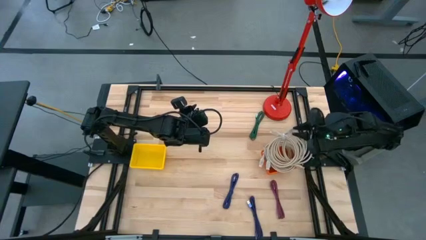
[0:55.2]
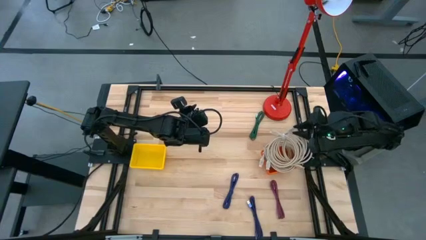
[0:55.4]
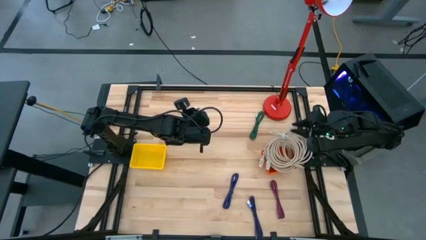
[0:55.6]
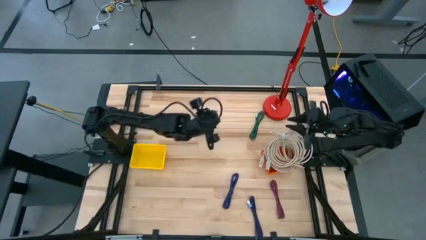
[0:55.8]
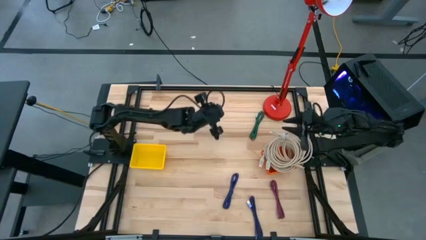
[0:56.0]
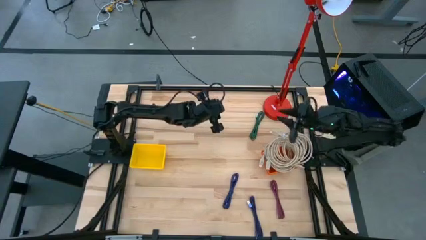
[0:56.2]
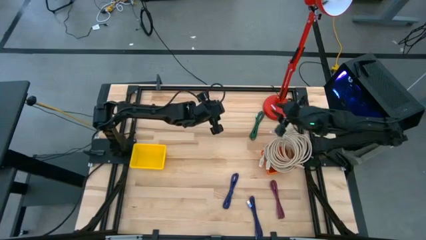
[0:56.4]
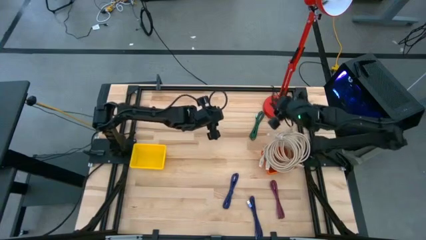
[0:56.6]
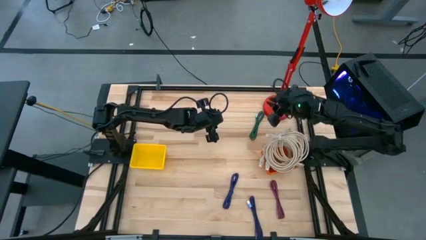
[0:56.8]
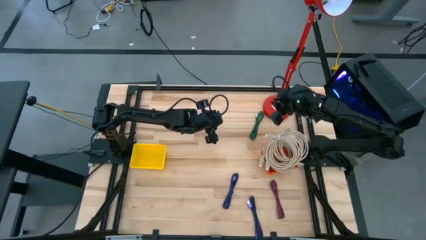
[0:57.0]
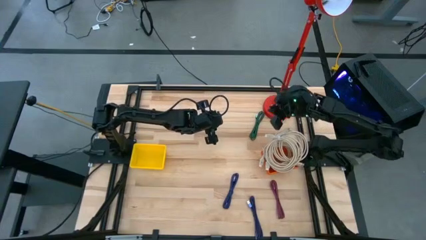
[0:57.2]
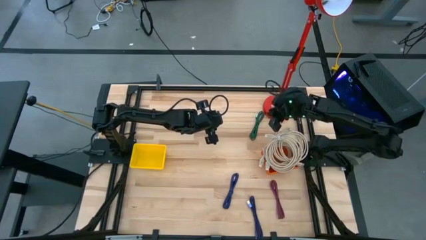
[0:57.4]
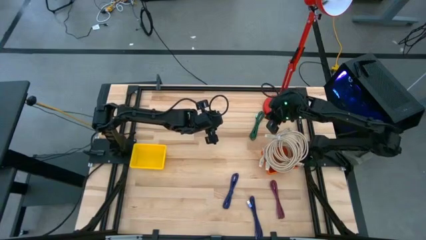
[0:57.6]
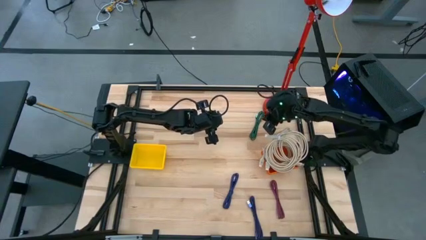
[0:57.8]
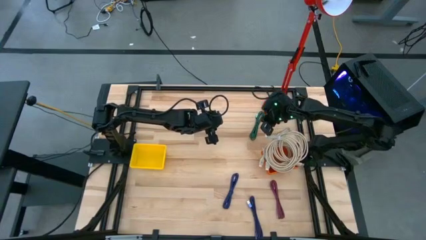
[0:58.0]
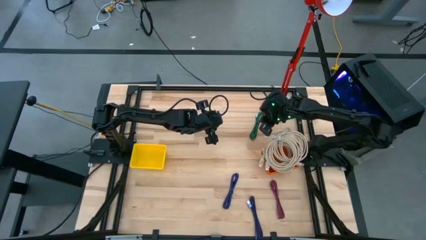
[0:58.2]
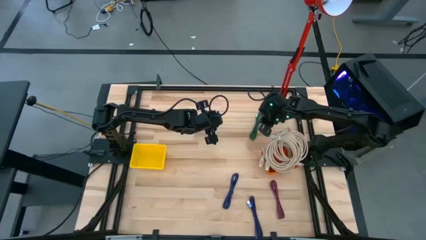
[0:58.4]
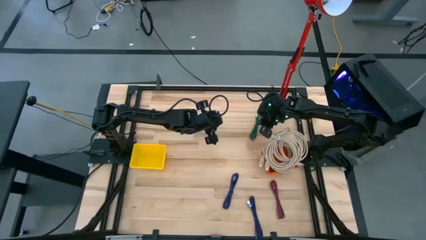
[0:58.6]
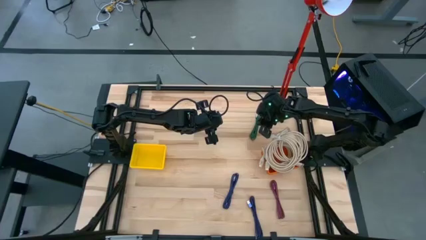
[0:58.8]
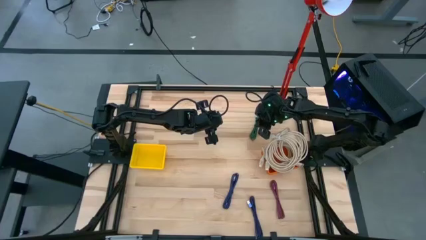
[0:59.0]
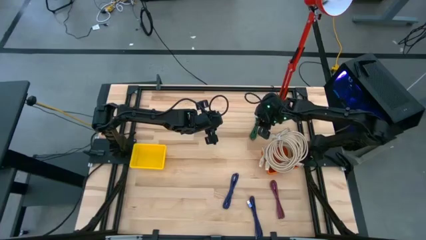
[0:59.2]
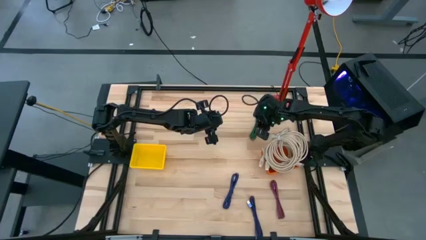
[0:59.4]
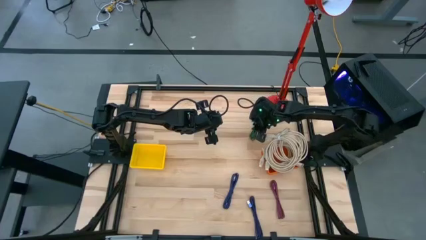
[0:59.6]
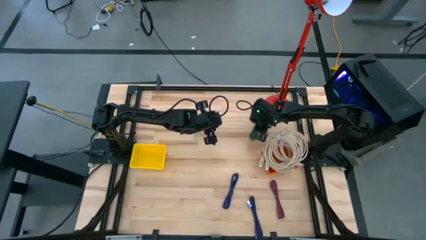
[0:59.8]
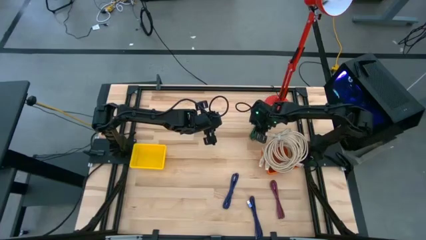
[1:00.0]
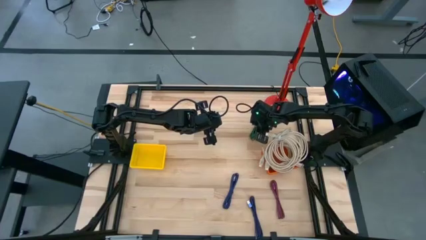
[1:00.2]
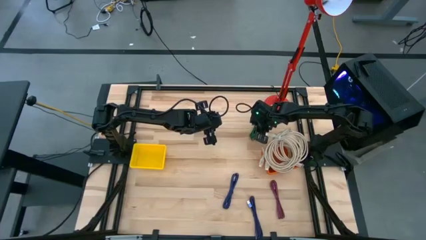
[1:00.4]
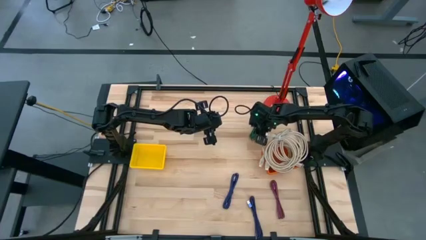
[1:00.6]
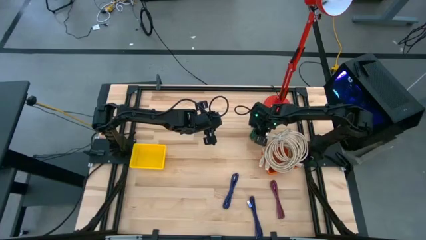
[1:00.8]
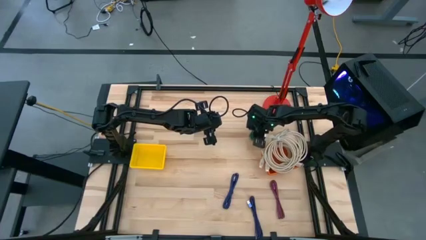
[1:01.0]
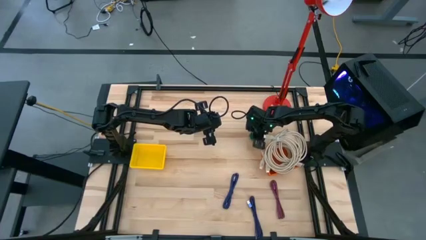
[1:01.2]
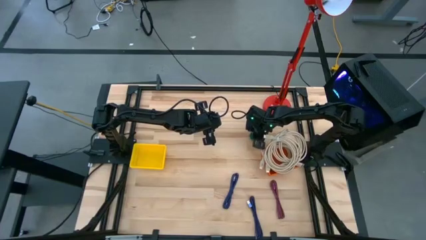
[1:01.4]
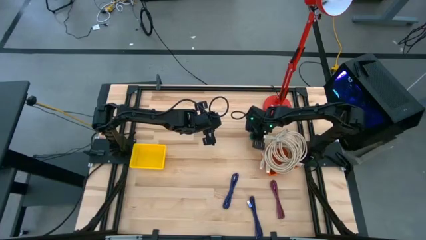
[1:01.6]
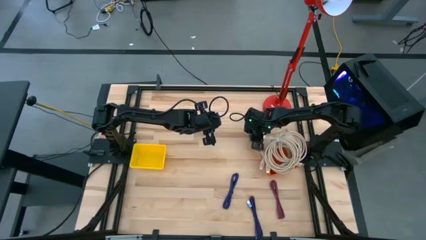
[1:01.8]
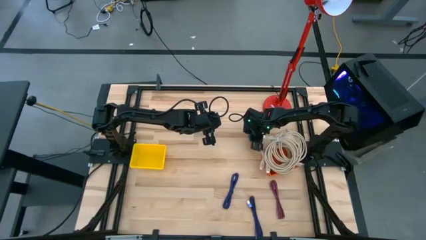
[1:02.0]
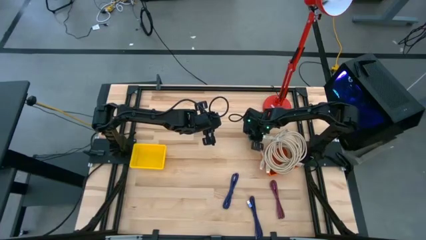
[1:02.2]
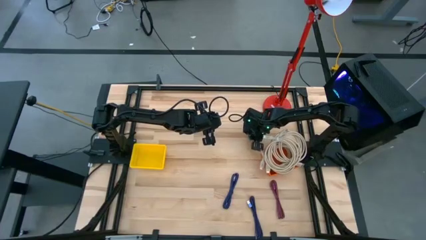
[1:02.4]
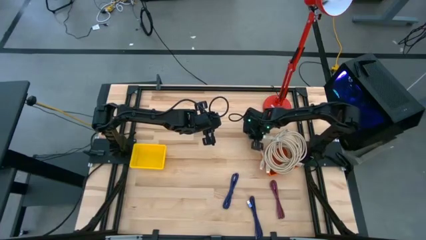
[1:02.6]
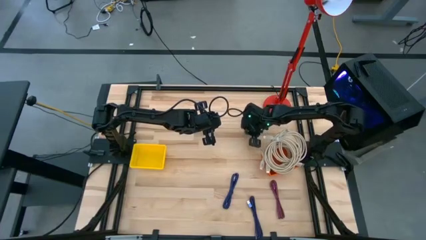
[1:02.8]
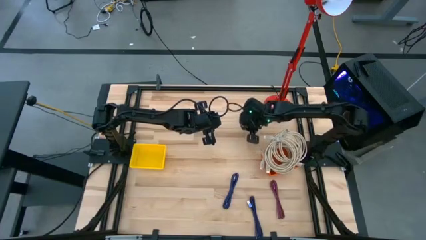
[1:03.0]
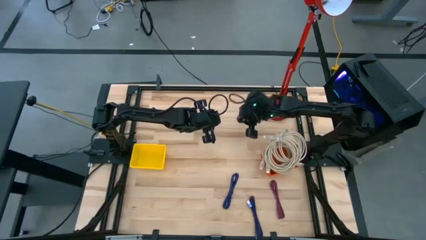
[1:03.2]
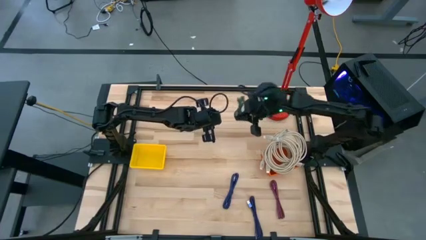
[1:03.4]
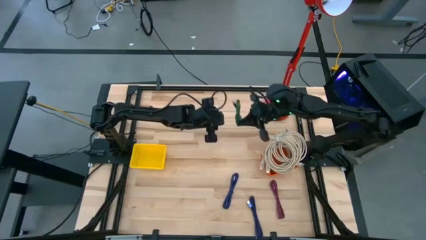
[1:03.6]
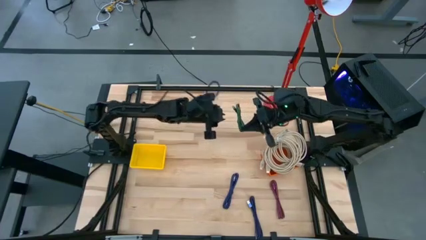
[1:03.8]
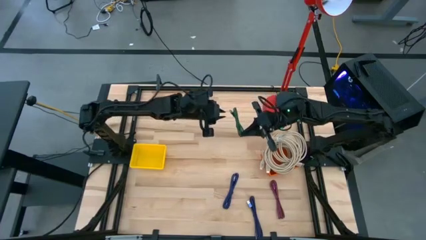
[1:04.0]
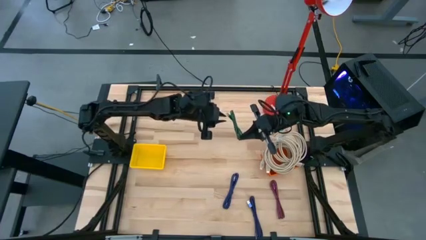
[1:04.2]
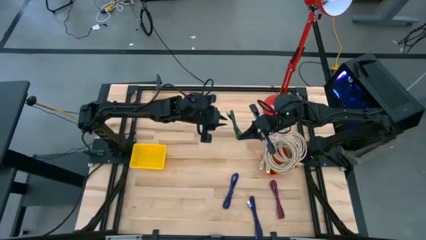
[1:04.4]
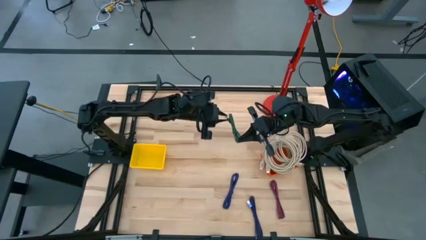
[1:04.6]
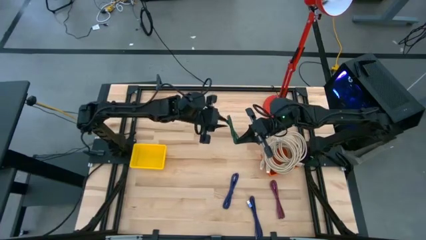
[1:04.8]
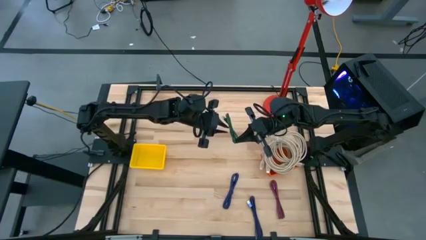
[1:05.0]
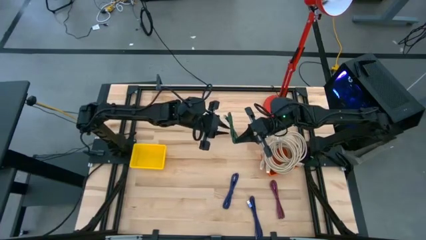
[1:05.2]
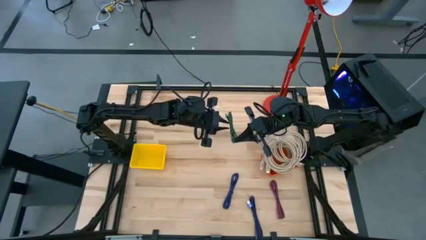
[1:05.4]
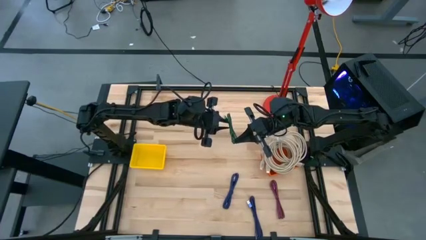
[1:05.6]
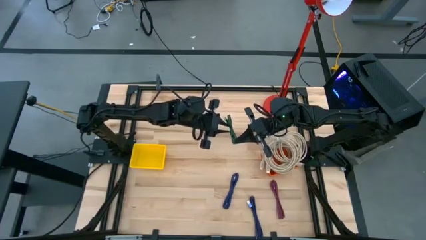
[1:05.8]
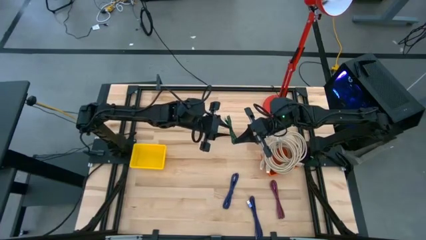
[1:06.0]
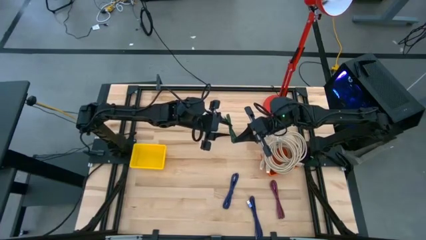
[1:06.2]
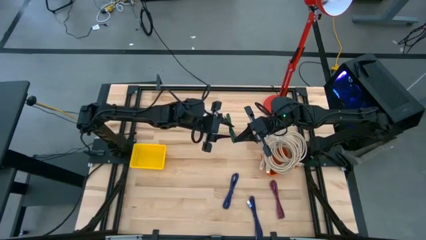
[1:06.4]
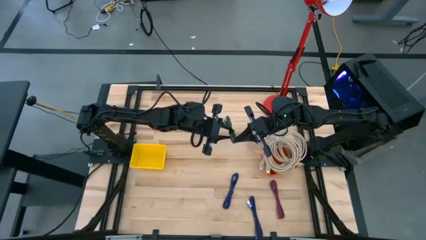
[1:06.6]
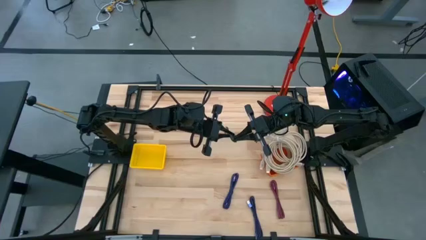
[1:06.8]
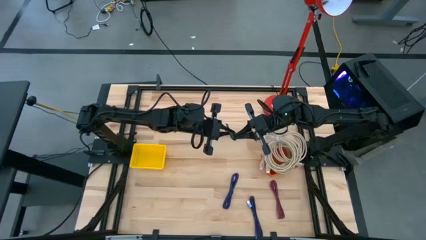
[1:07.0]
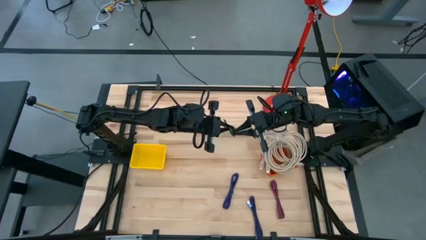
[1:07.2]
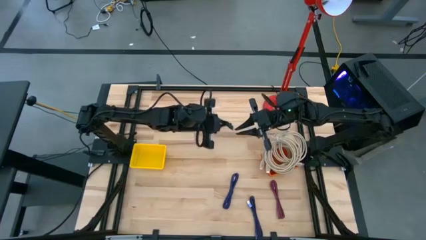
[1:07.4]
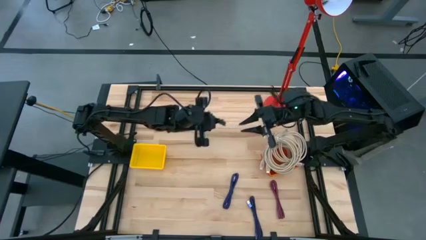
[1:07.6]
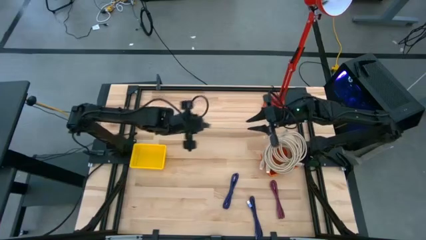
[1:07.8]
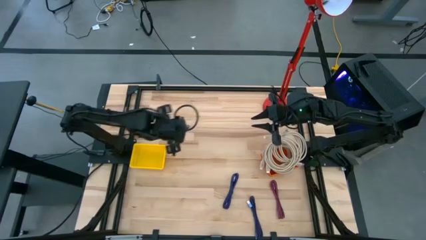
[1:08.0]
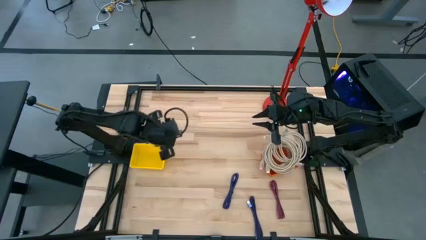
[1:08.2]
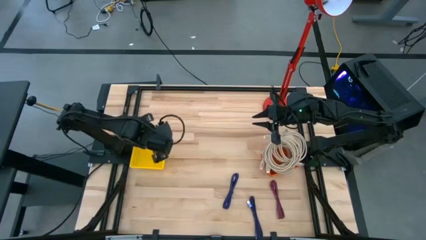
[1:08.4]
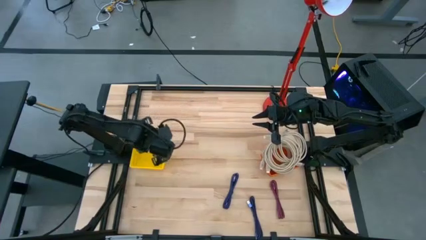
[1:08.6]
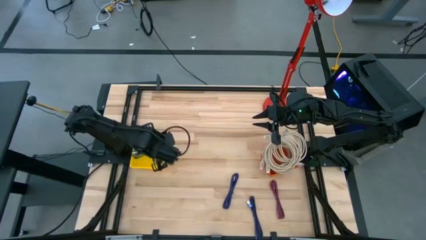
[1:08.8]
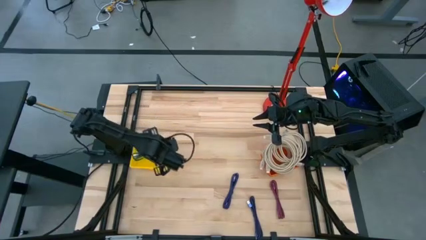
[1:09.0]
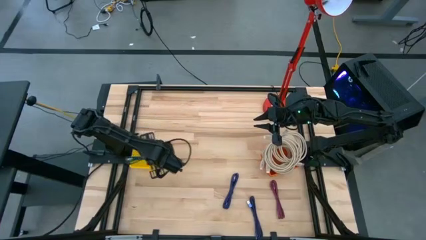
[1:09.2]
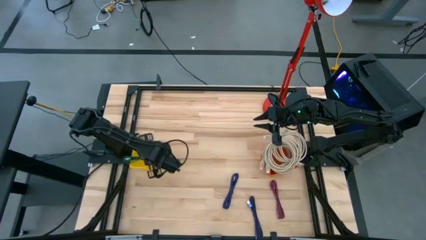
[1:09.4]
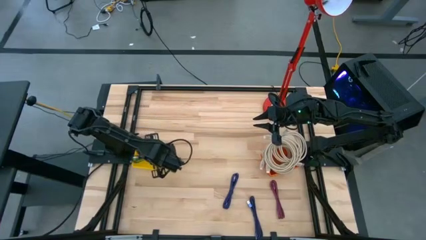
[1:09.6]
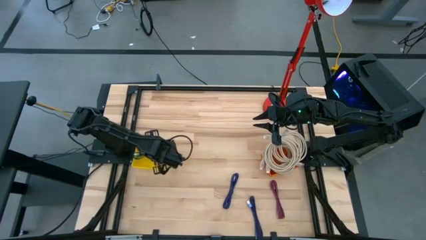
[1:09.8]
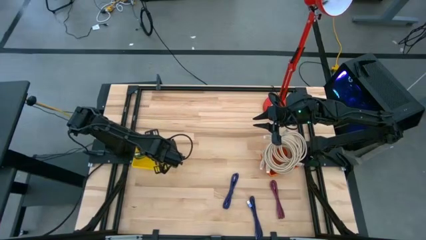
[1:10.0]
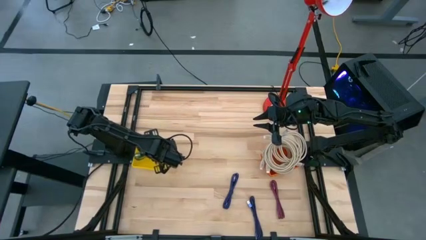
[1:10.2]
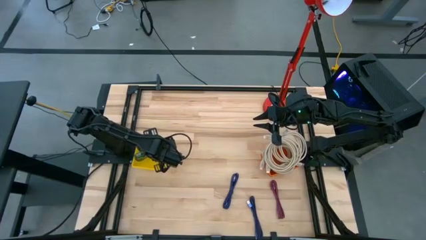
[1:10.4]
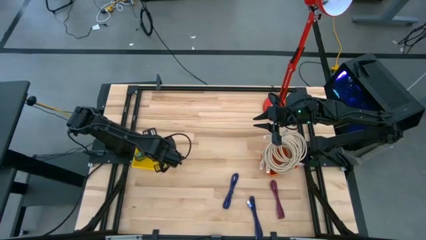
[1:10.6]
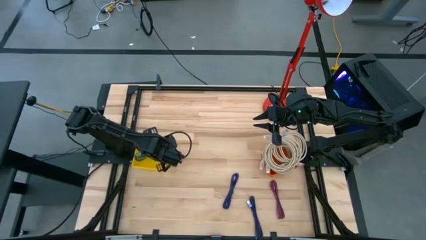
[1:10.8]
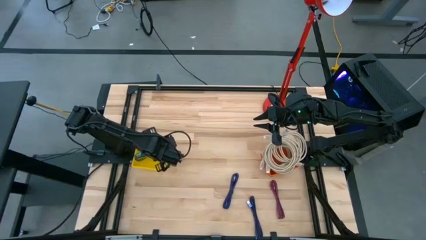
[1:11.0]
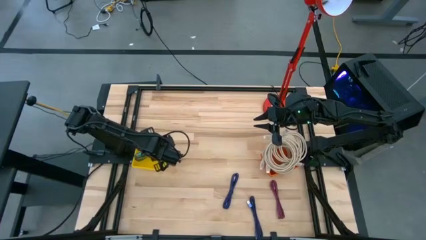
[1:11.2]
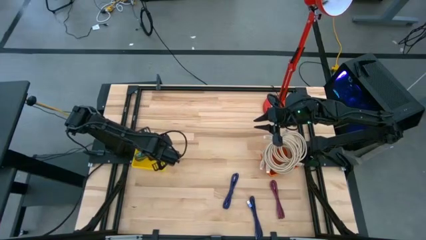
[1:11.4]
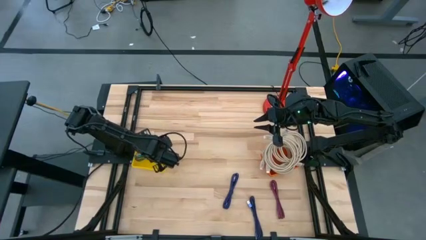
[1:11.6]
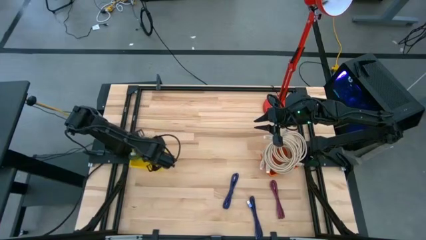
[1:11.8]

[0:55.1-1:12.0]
Task: Pick & Place USB Port
Put the black and green charger cable into the yellow bin
